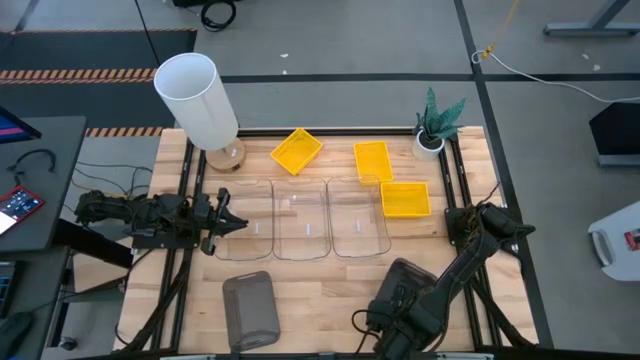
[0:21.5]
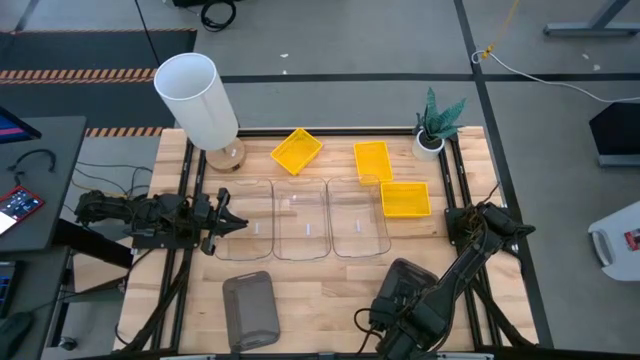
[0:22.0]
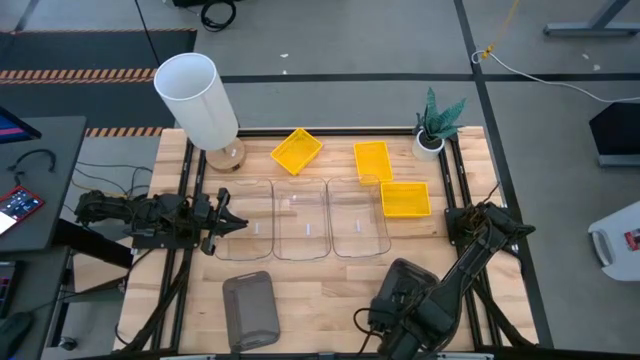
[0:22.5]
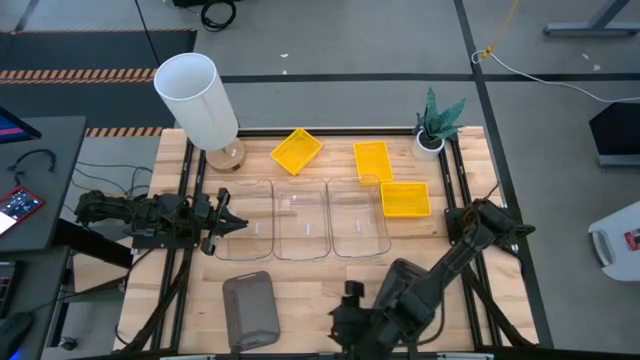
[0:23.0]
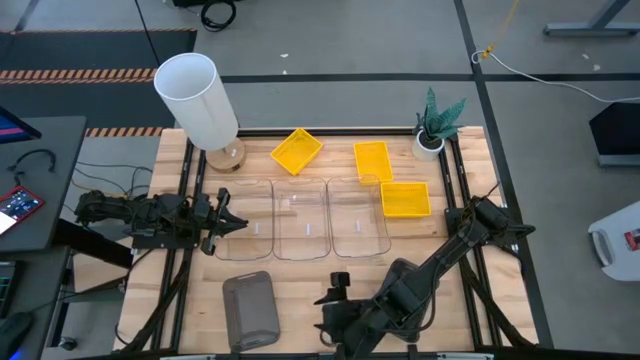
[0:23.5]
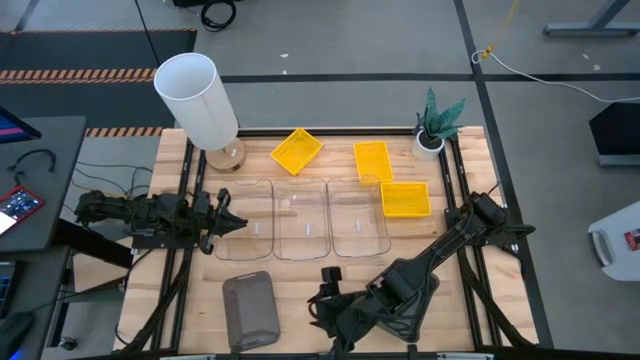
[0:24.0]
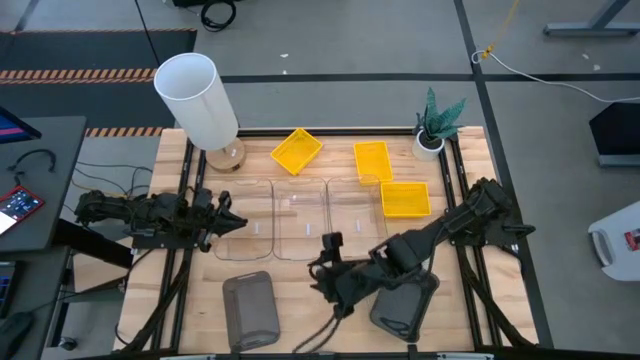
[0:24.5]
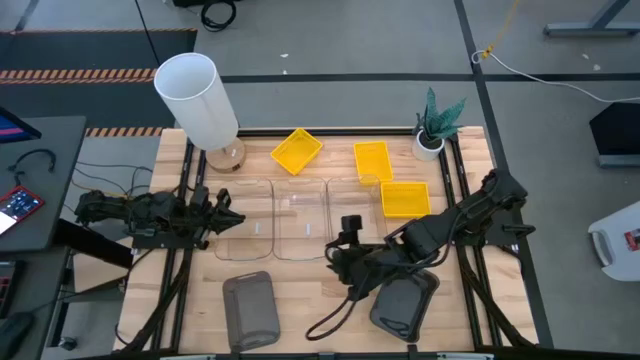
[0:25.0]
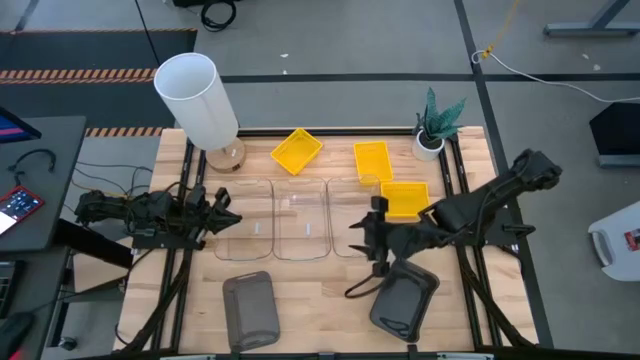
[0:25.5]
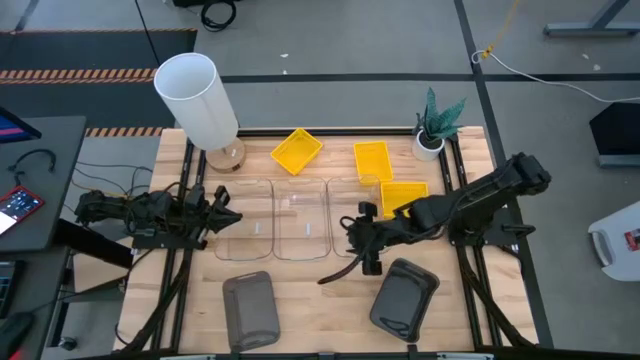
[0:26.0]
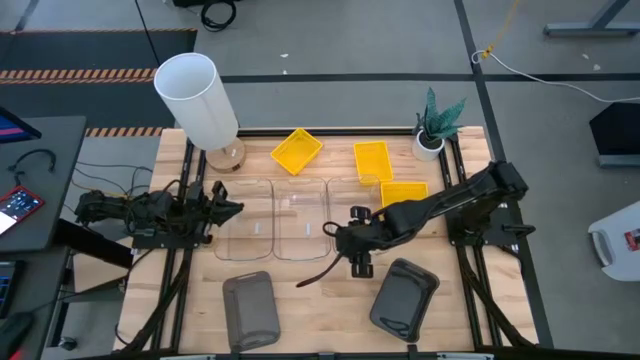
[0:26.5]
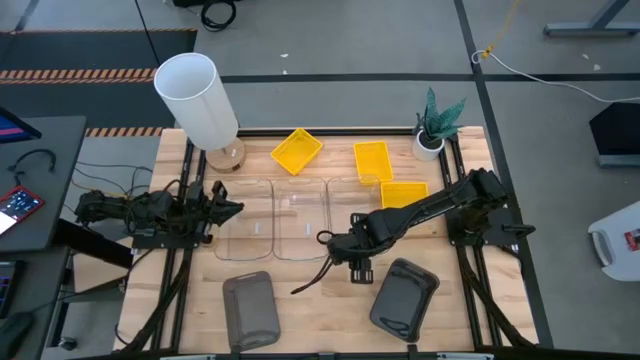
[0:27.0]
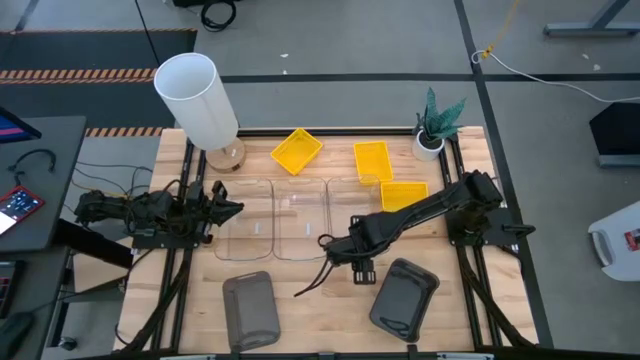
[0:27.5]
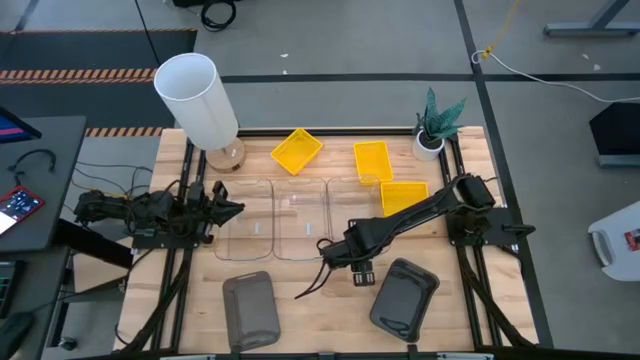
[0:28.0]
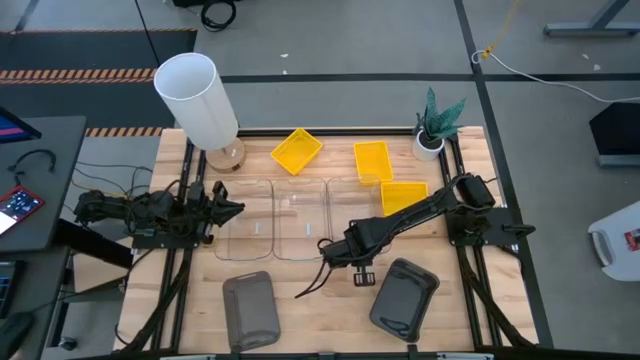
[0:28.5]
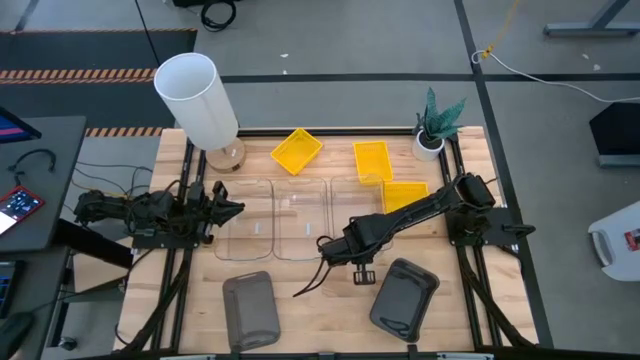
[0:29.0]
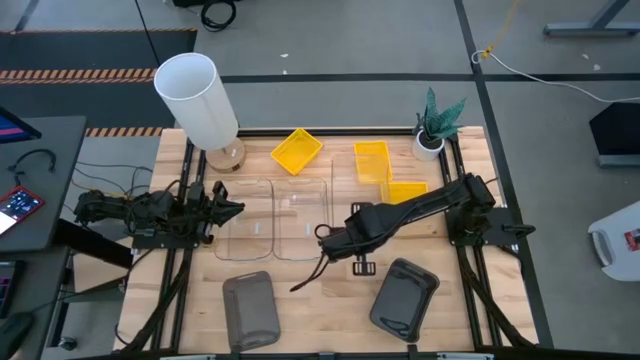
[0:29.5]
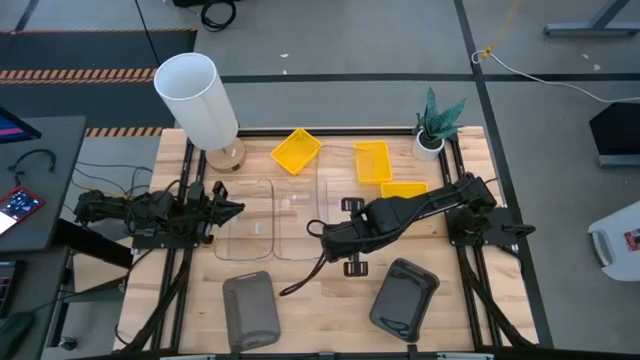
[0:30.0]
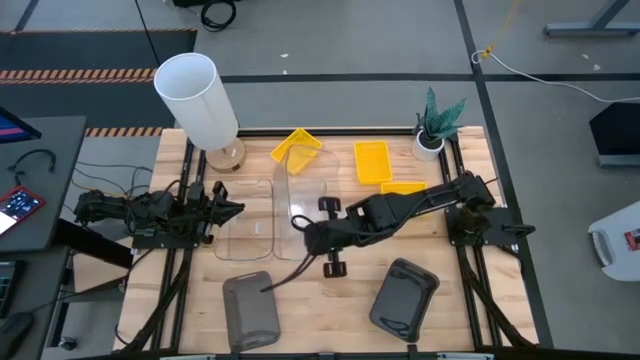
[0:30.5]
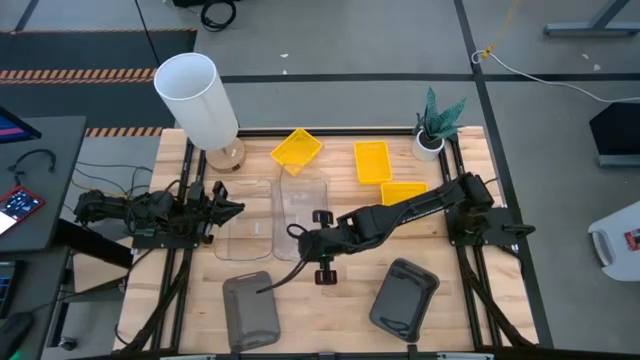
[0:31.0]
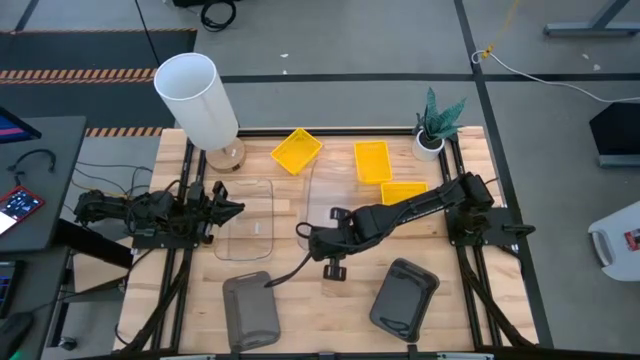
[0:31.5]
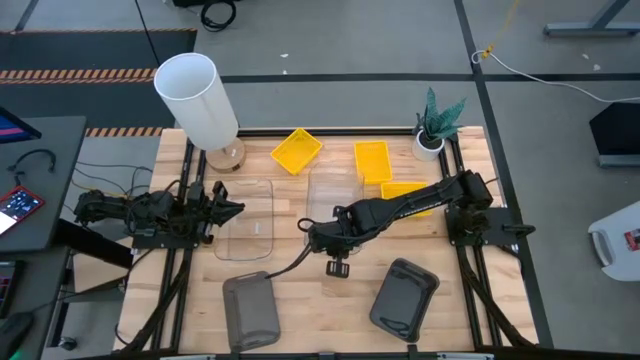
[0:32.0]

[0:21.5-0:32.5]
Stack the right transparent bin into the middle transparent bin

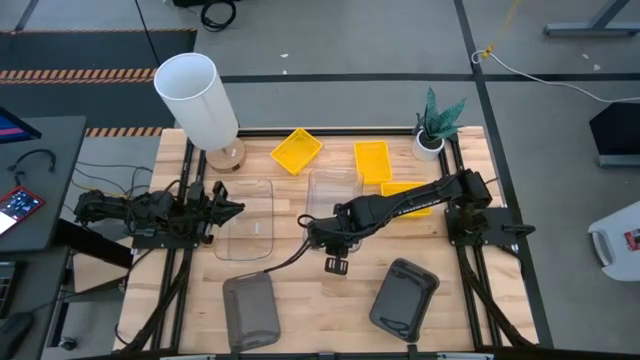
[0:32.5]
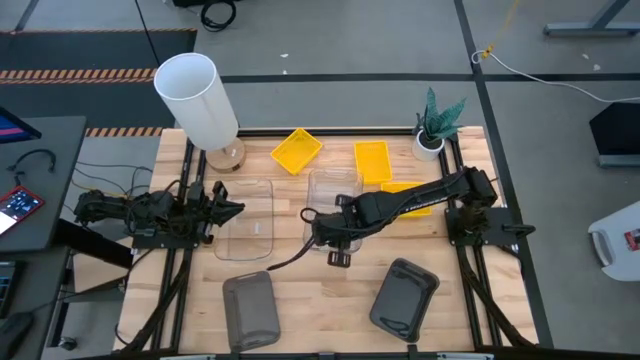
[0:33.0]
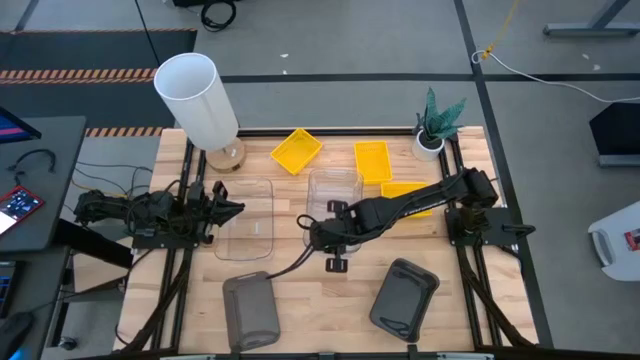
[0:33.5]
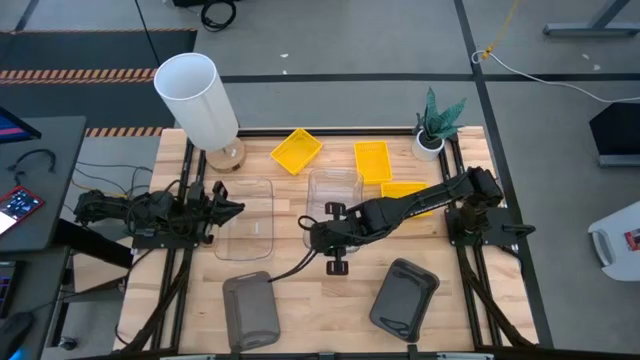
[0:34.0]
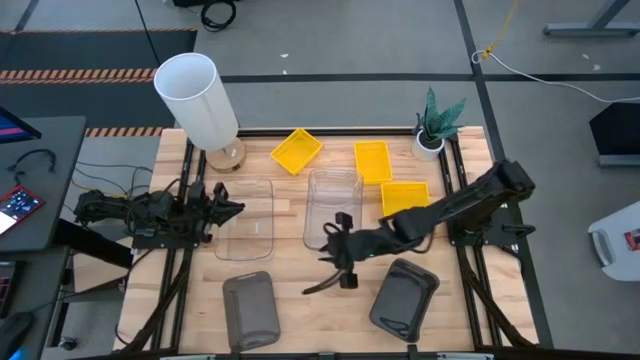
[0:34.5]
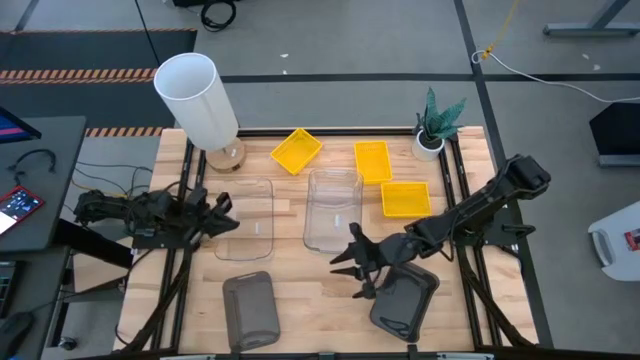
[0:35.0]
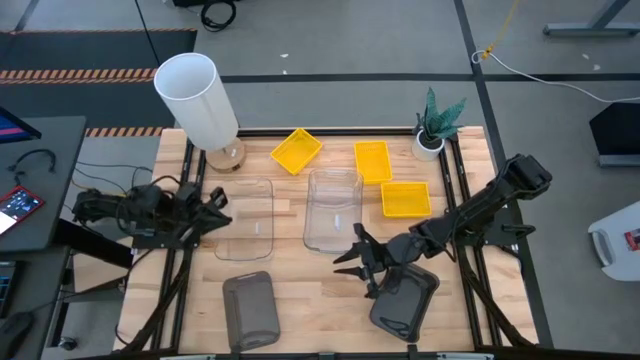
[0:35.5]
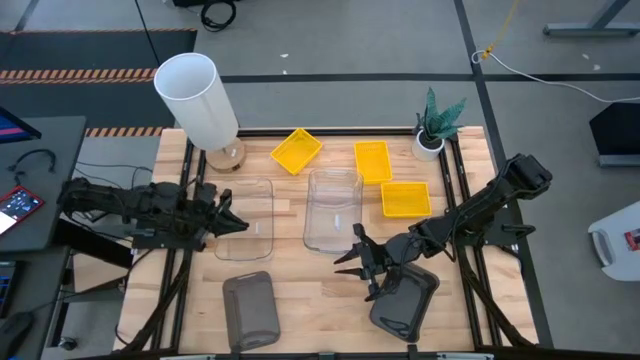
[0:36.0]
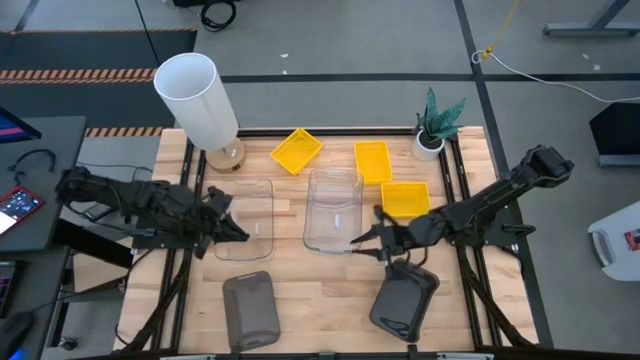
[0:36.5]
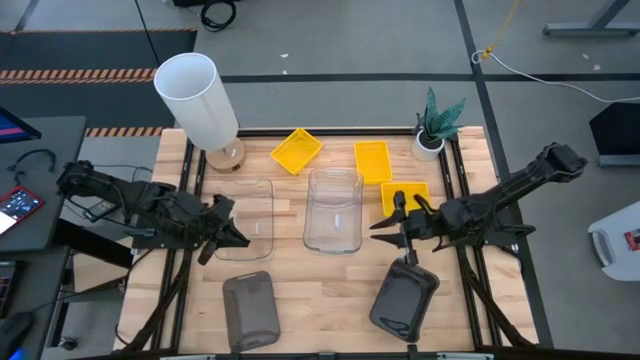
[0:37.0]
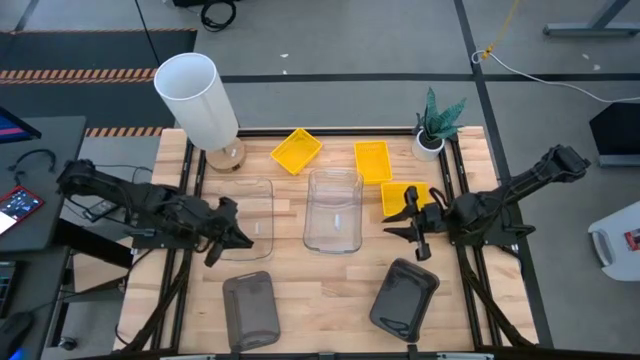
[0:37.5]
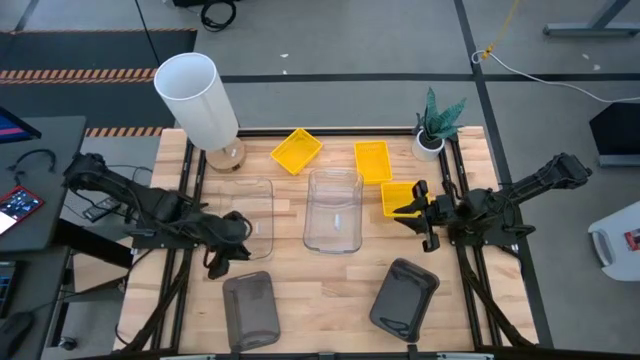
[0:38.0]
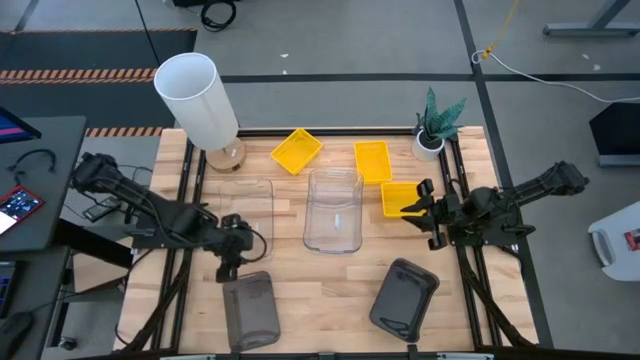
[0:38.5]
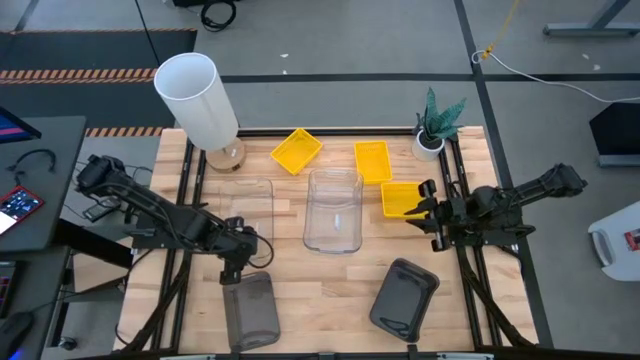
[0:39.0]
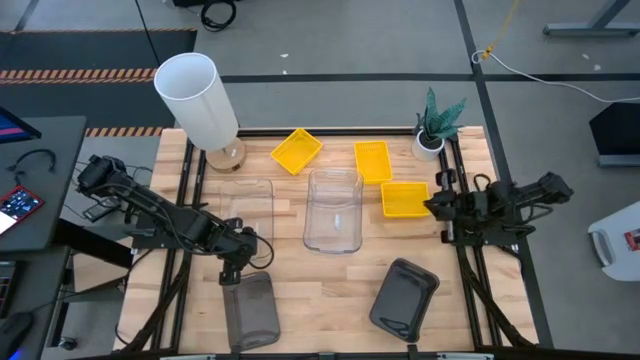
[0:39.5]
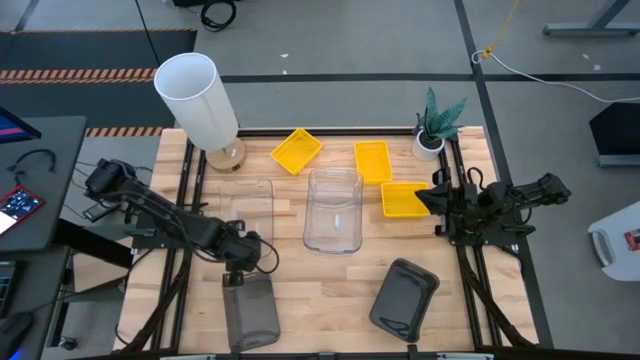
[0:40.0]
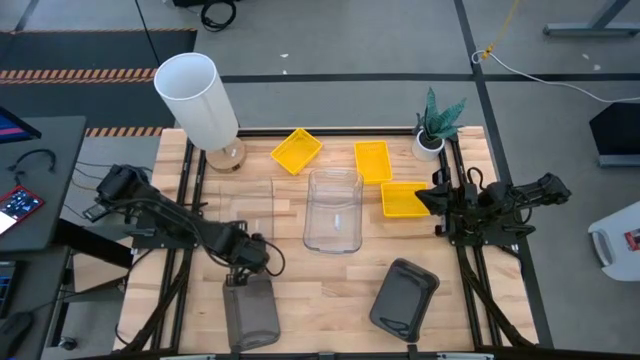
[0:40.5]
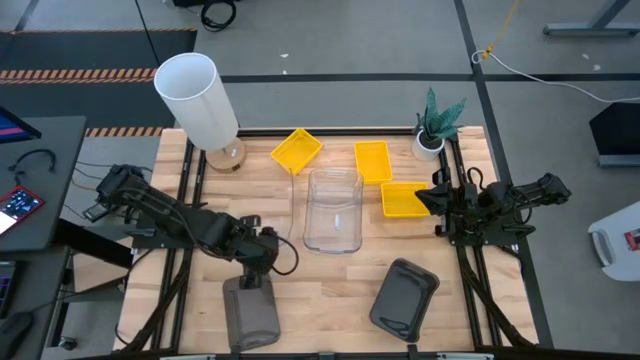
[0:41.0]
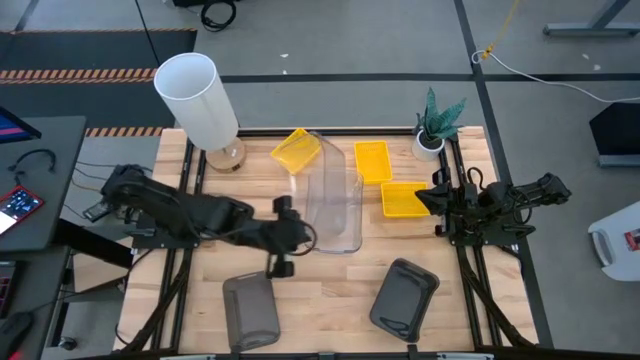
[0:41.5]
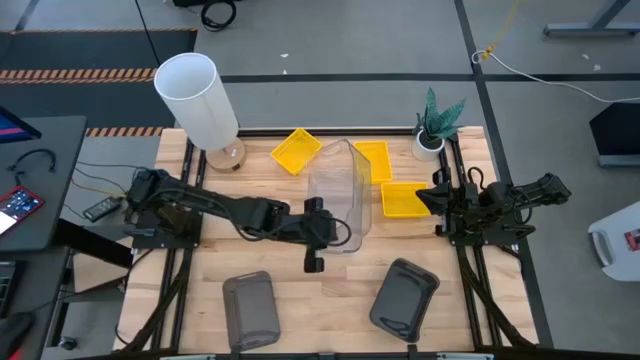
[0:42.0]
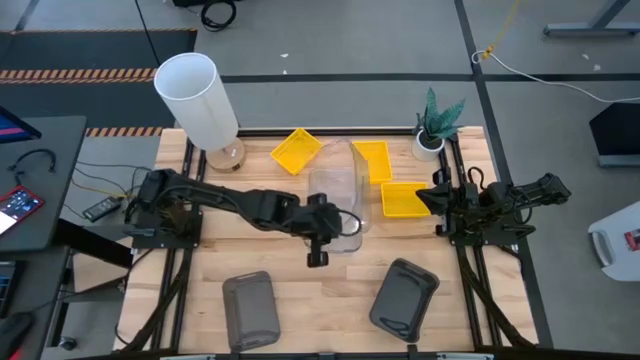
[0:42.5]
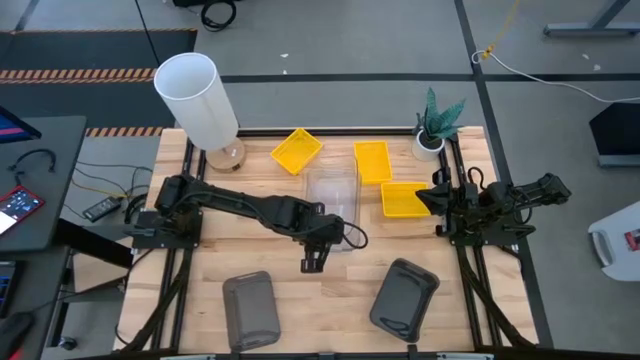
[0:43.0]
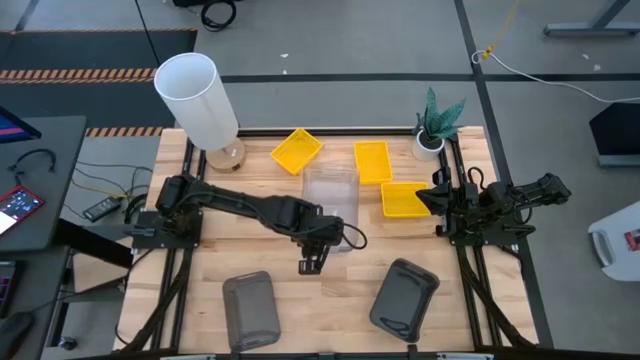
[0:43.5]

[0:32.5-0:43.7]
Stack the left transparent bin into the transparent bin
